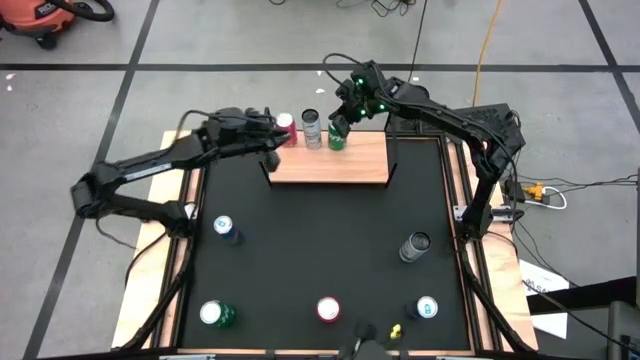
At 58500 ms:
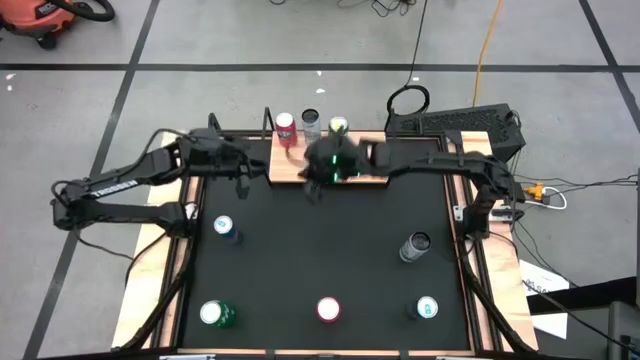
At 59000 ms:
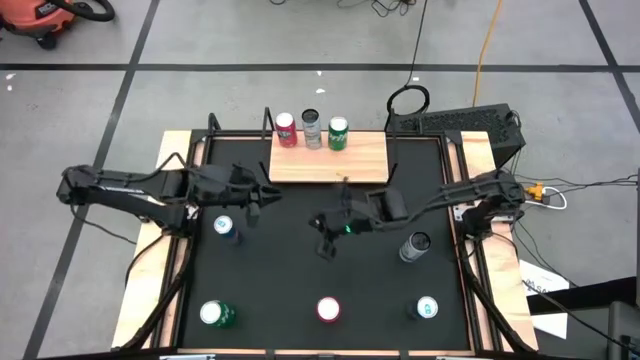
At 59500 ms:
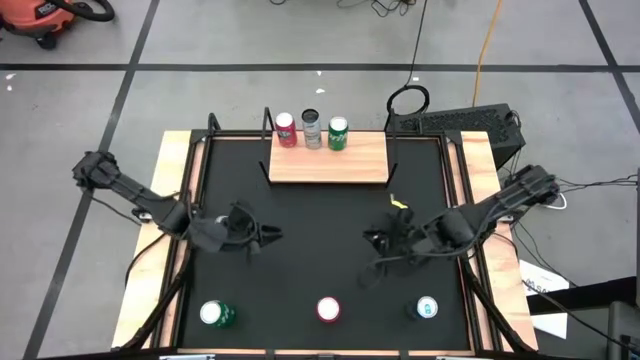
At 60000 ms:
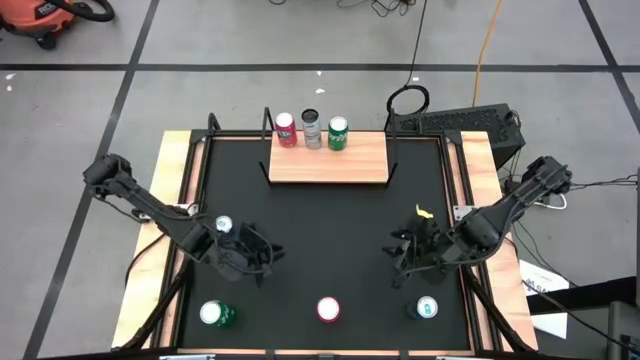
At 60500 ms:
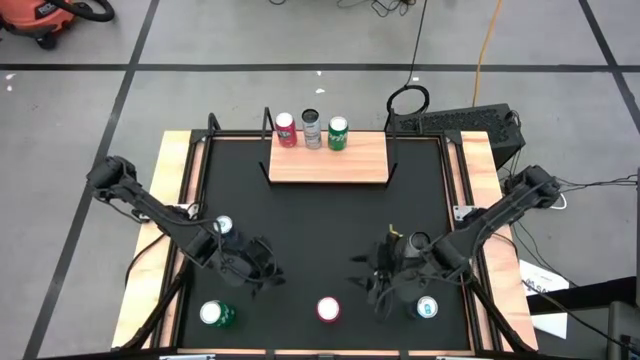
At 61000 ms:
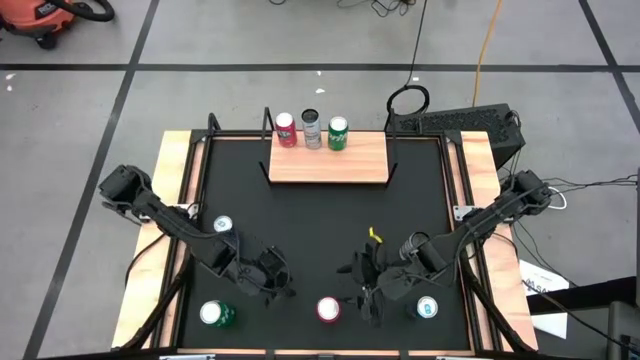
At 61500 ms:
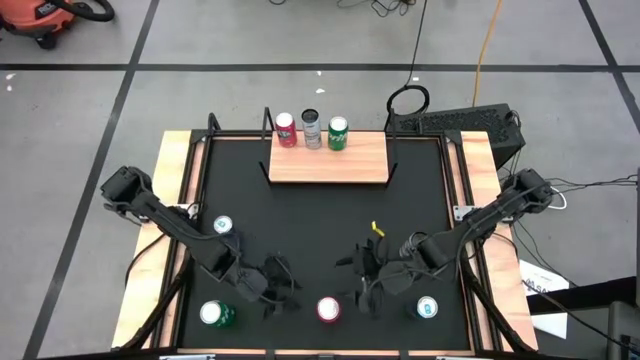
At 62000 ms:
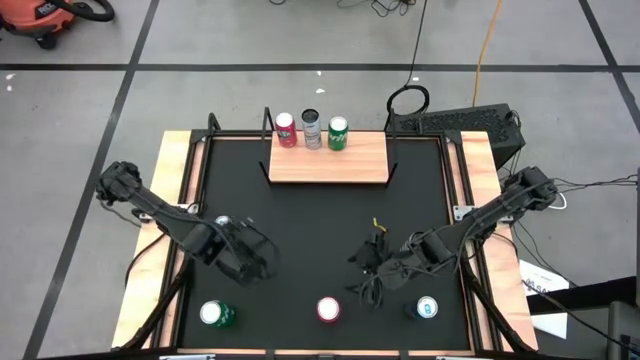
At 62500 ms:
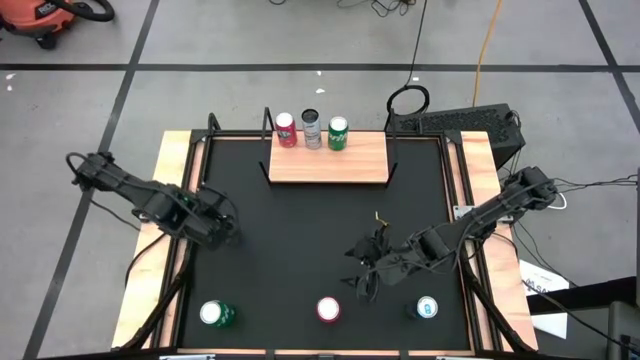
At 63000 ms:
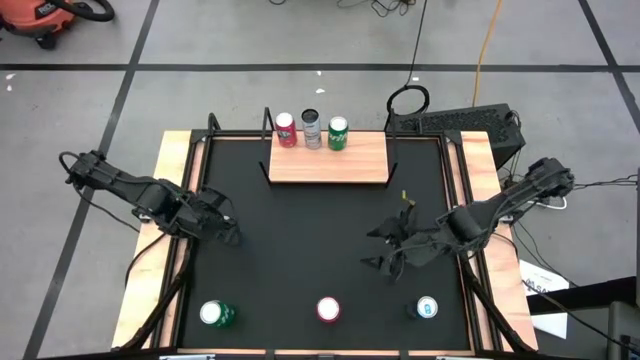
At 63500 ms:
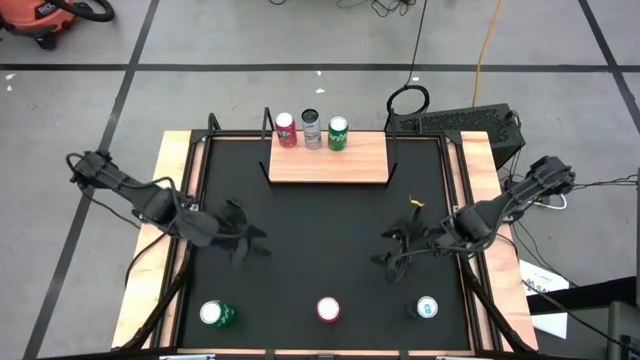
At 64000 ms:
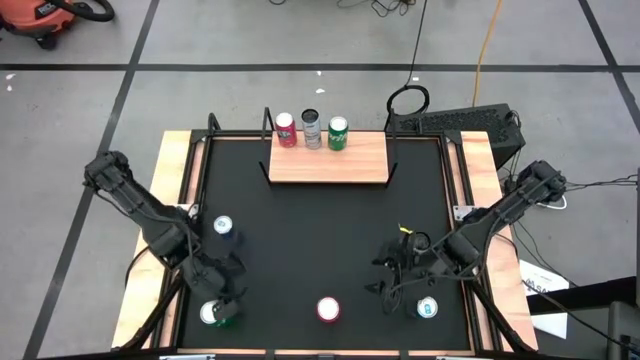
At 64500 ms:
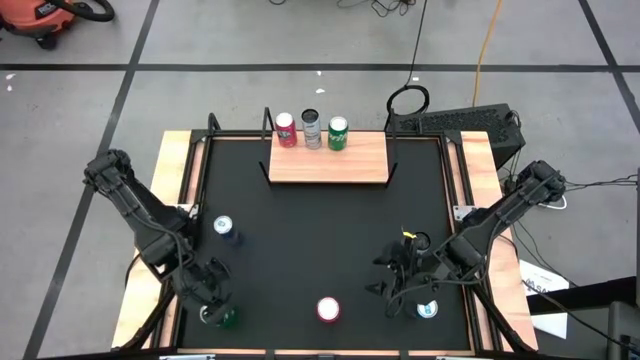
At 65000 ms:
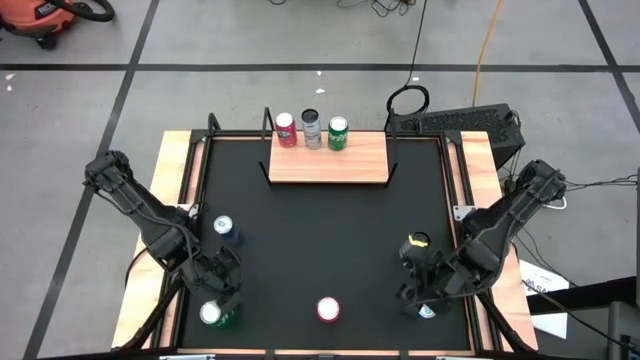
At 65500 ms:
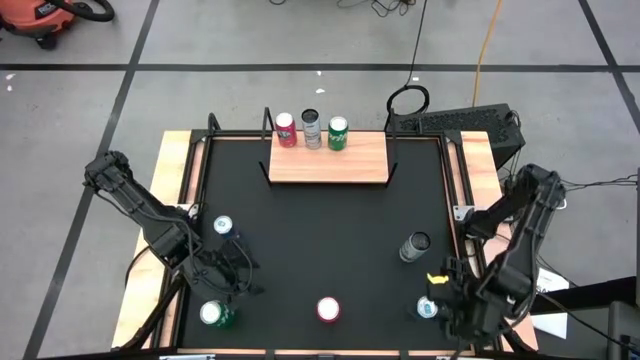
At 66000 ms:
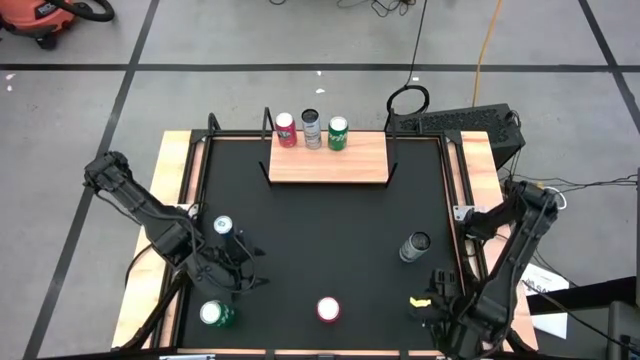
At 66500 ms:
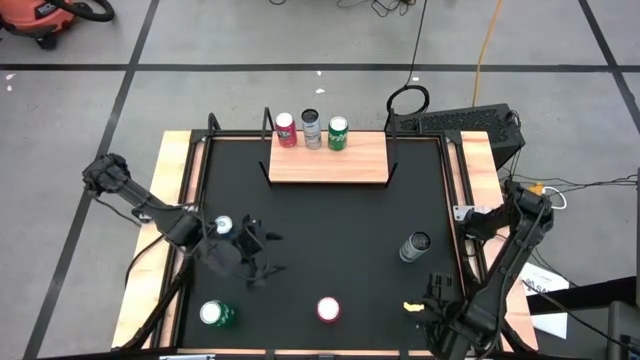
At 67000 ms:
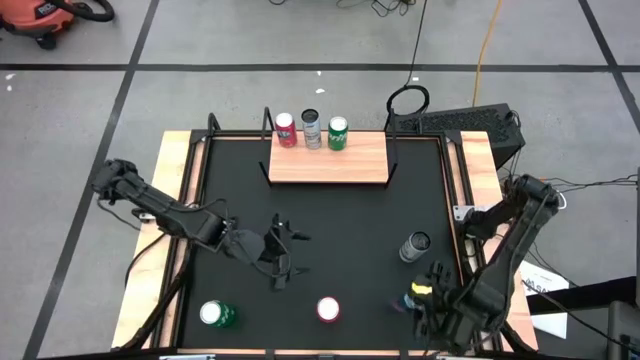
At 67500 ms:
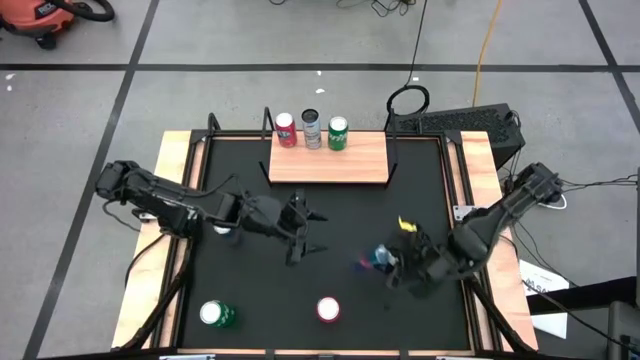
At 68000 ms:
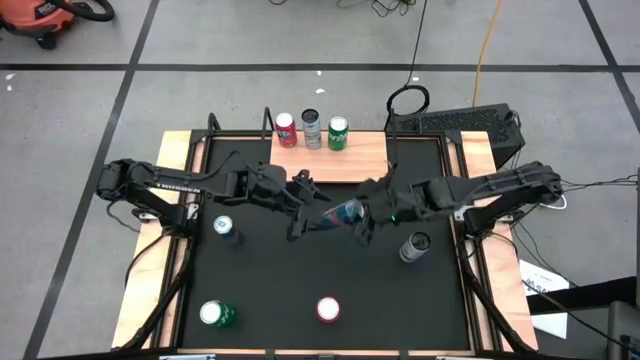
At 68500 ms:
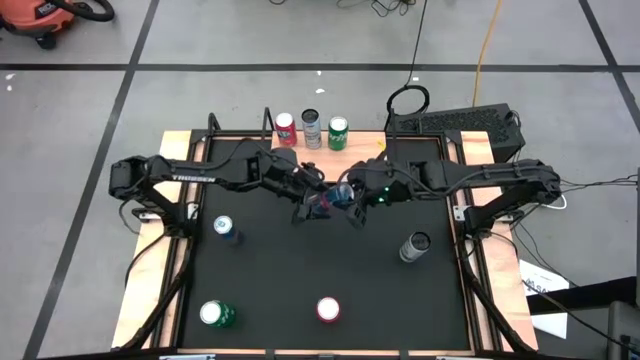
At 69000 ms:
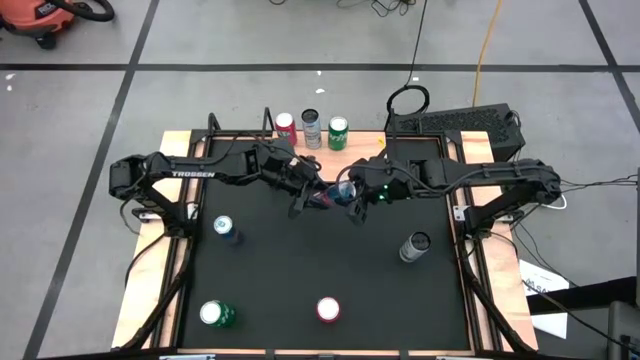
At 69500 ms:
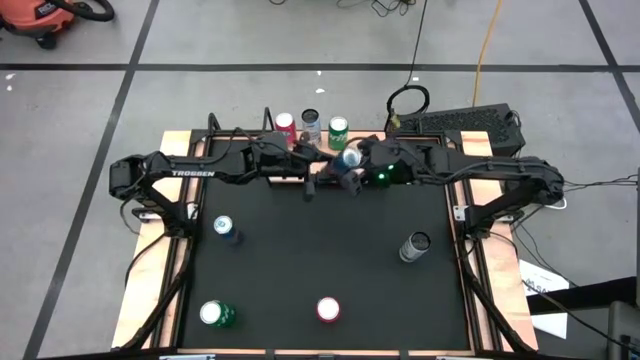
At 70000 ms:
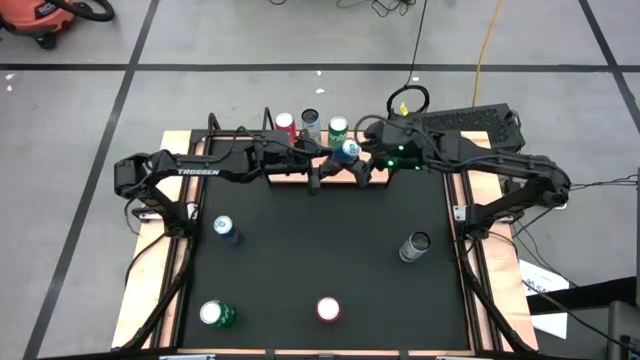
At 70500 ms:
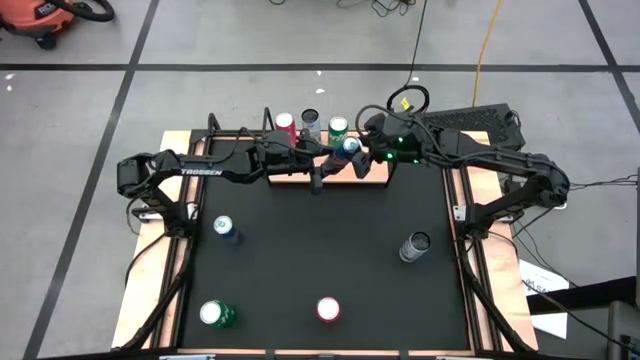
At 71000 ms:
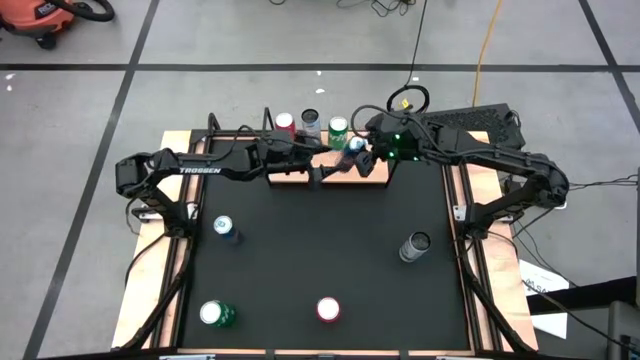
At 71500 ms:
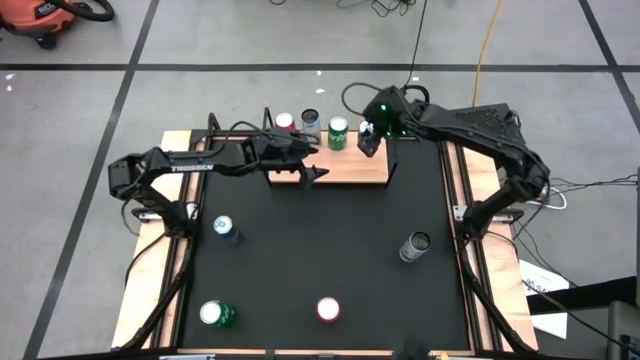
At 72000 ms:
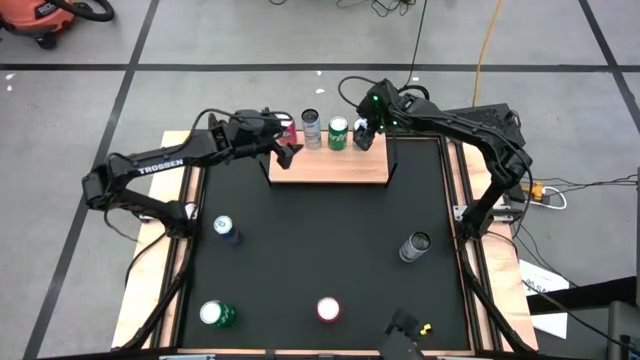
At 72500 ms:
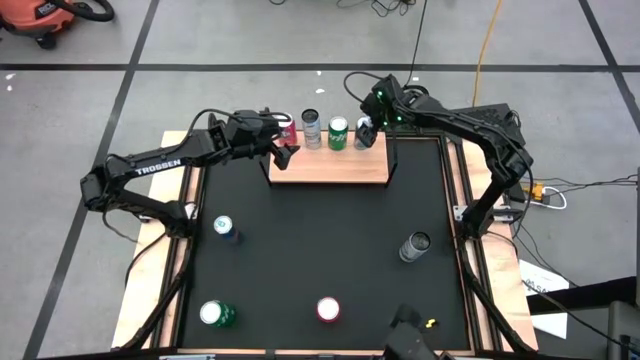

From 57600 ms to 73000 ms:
Task: Place canned beverage on shelf
Put the bottom blue soda can on the shelf

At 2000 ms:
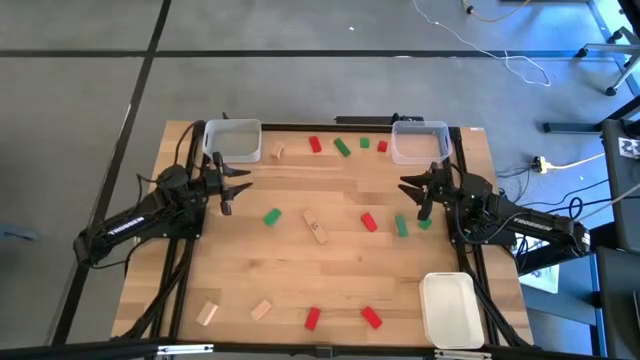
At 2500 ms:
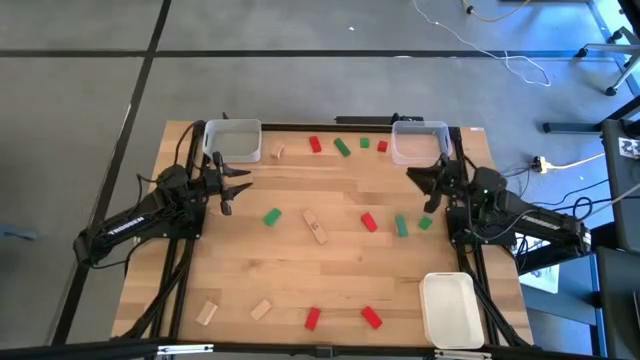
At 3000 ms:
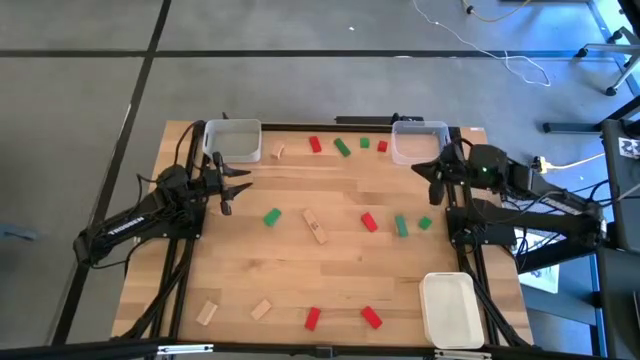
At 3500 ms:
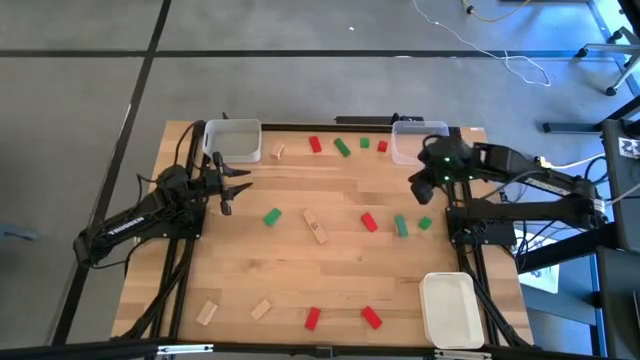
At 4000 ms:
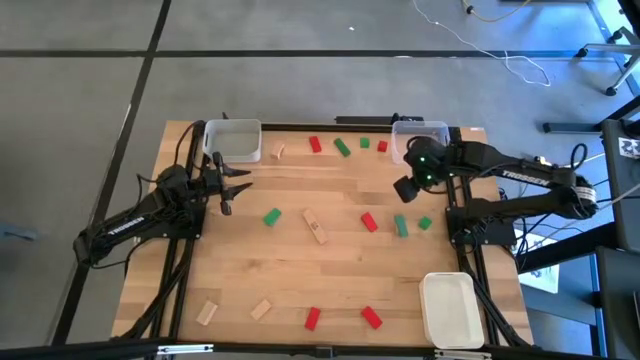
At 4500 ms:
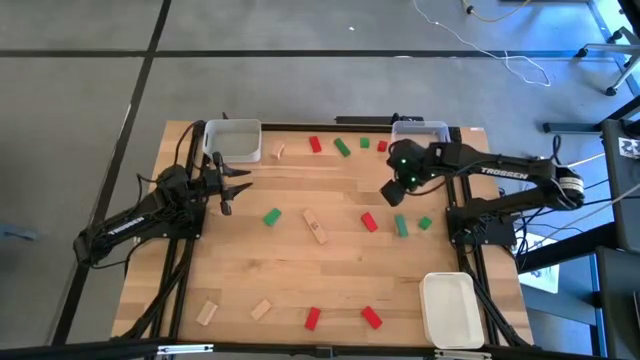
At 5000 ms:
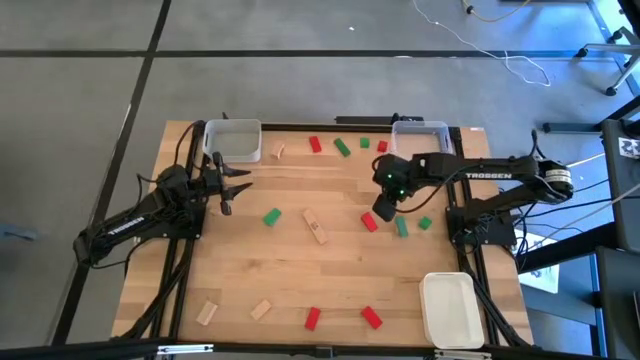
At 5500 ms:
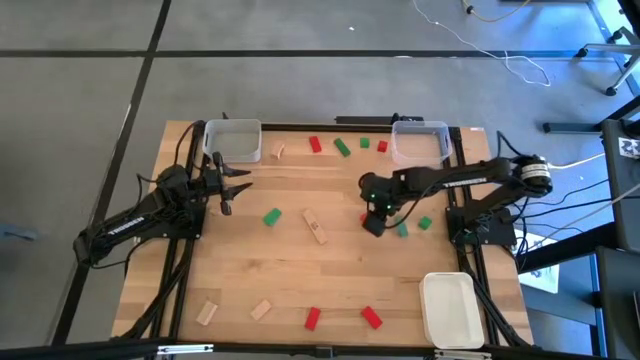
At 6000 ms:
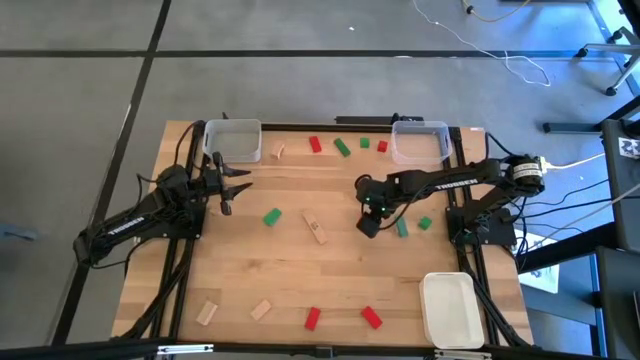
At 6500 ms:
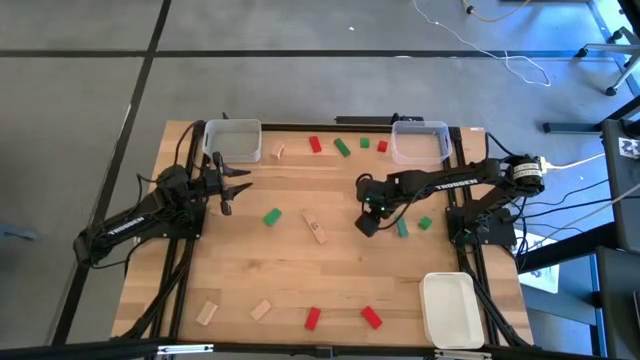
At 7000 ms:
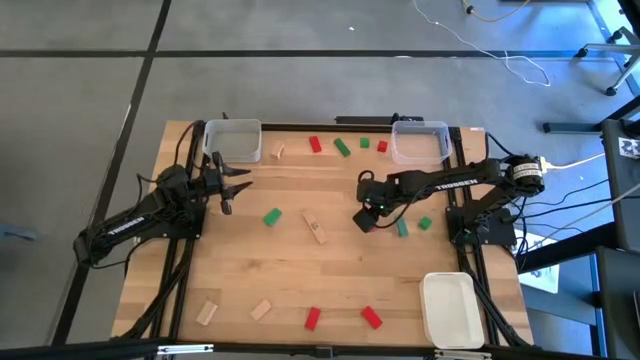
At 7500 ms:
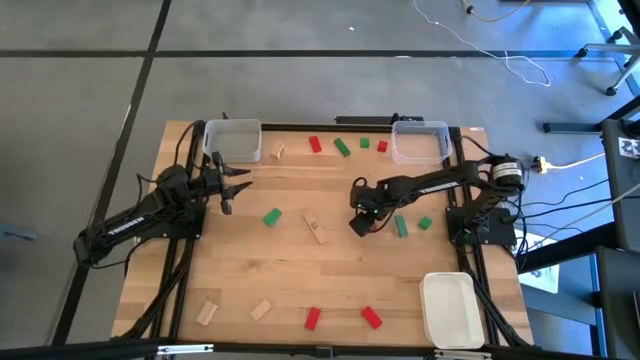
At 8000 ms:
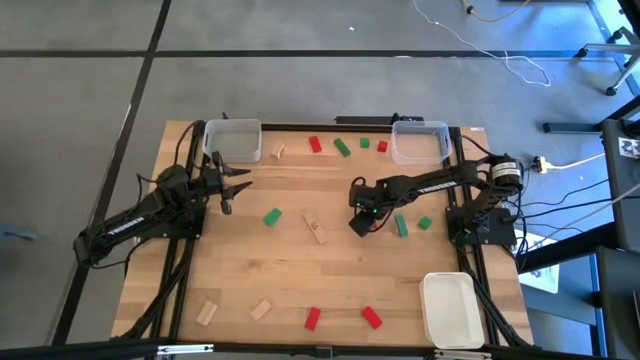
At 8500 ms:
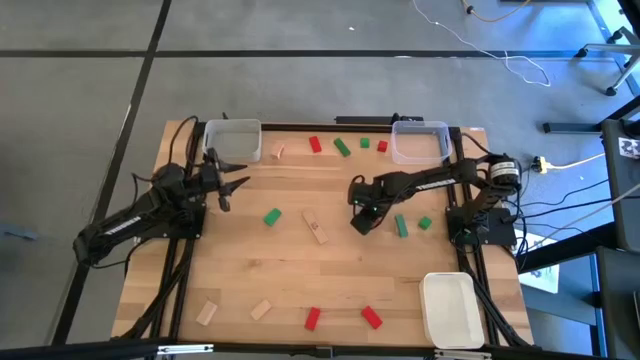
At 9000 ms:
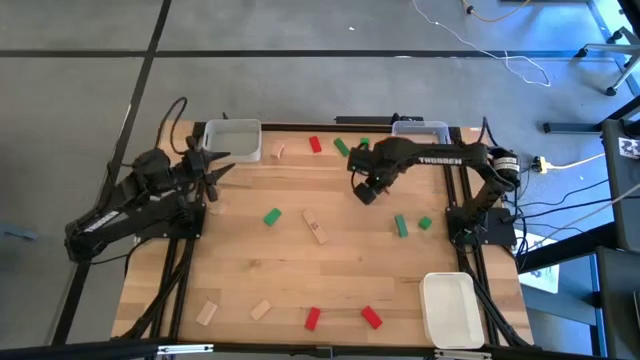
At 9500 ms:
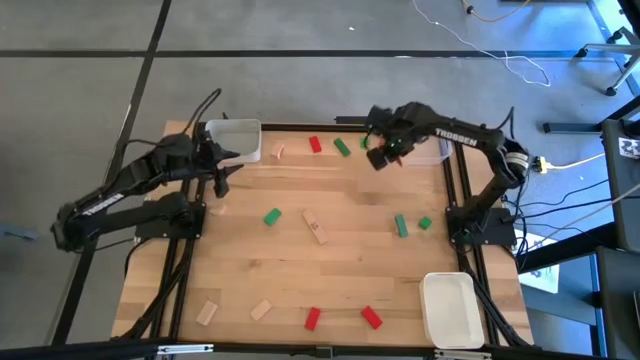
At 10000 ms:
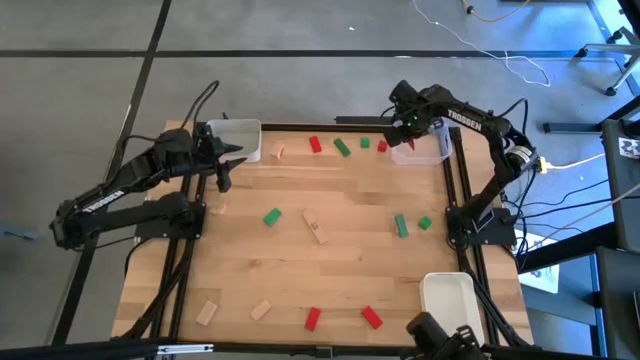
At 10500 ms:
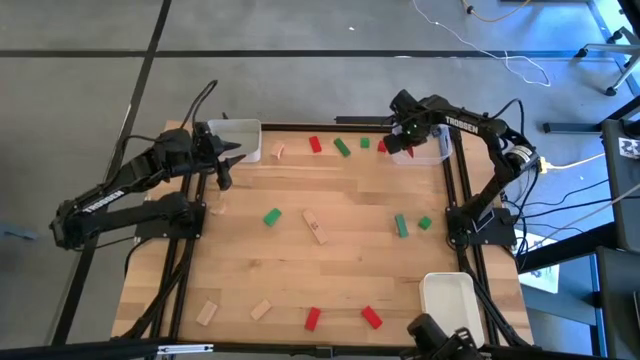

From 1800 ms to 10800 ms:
Task: Sort & place blocks by color
Put the red block into the transparent bin
